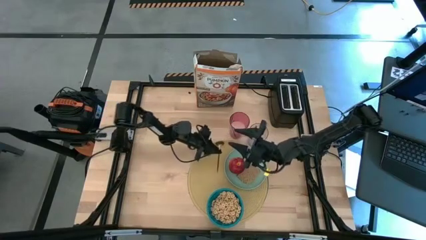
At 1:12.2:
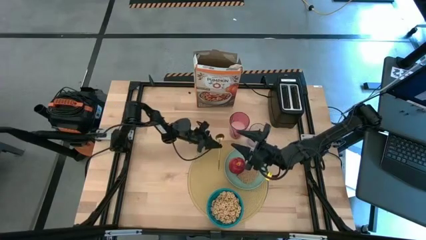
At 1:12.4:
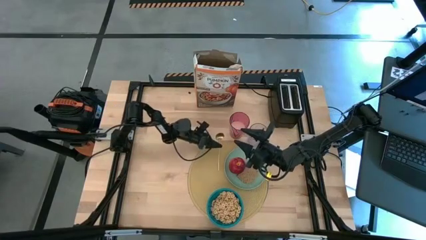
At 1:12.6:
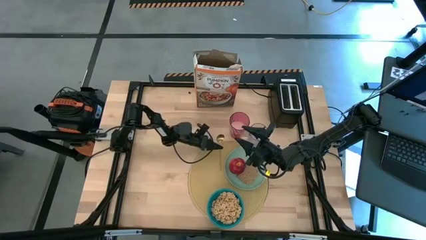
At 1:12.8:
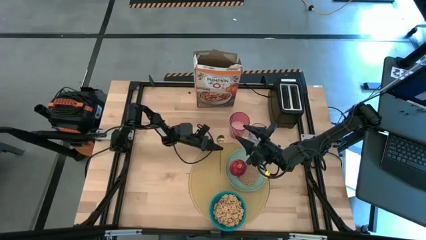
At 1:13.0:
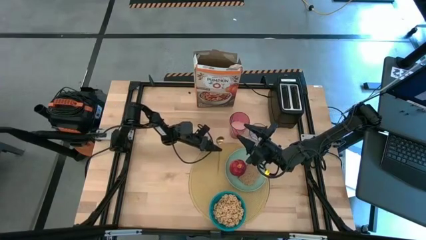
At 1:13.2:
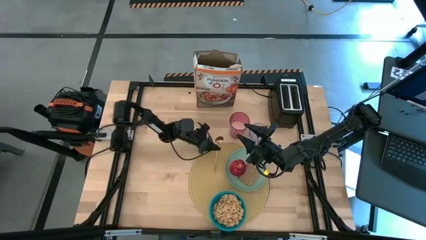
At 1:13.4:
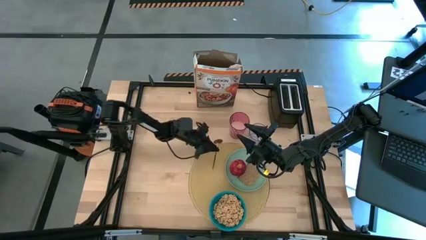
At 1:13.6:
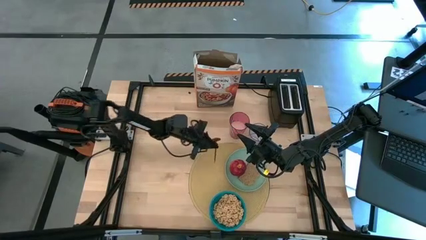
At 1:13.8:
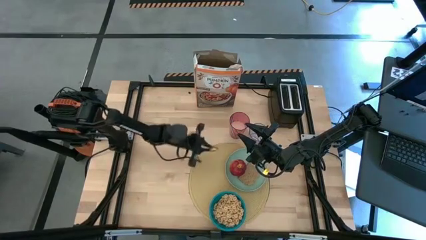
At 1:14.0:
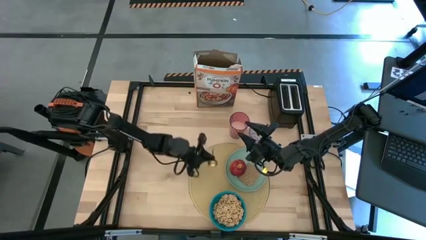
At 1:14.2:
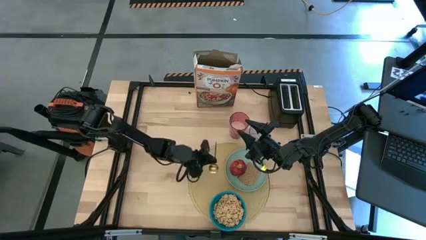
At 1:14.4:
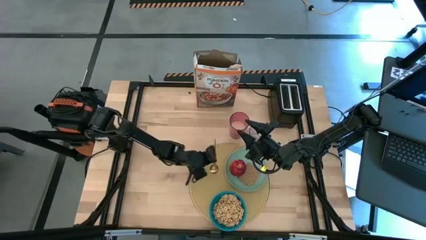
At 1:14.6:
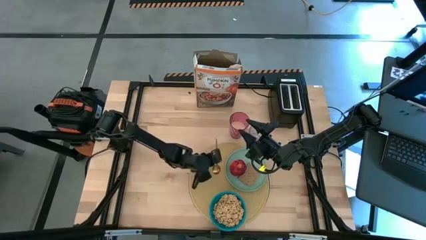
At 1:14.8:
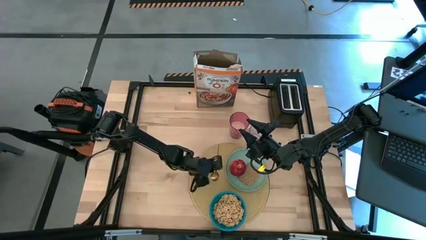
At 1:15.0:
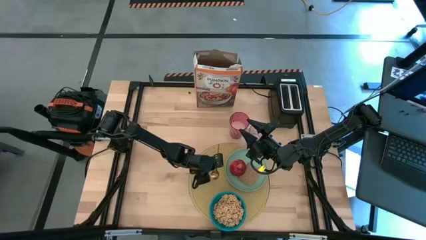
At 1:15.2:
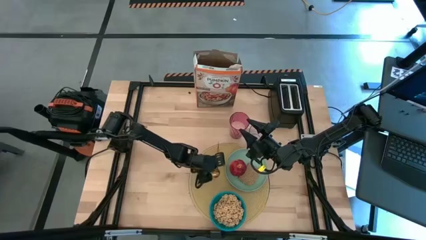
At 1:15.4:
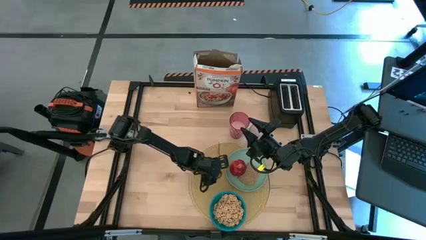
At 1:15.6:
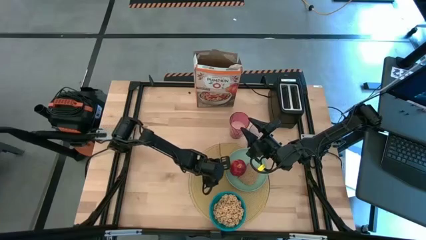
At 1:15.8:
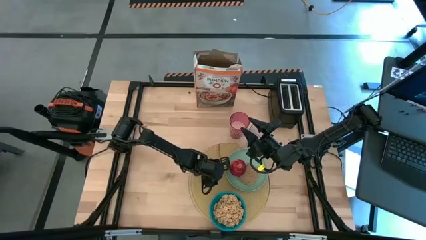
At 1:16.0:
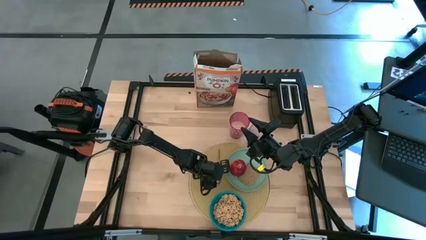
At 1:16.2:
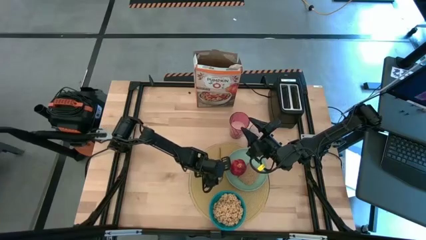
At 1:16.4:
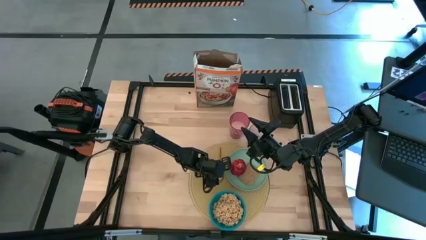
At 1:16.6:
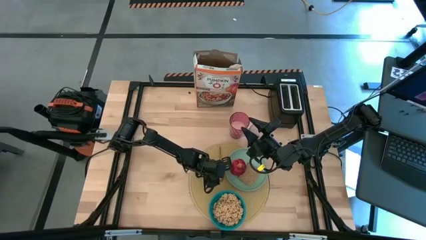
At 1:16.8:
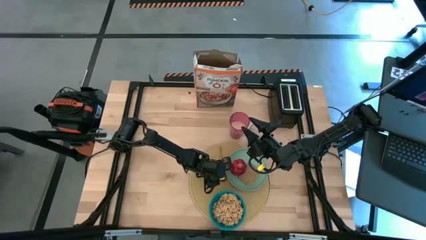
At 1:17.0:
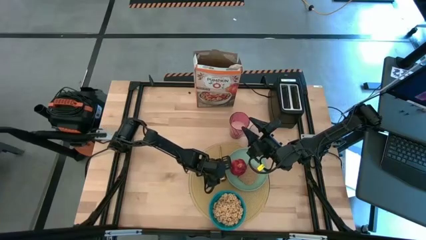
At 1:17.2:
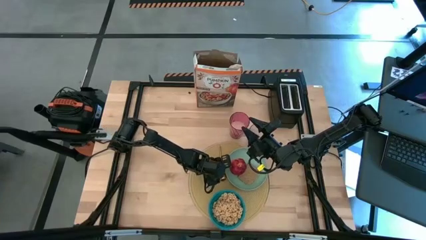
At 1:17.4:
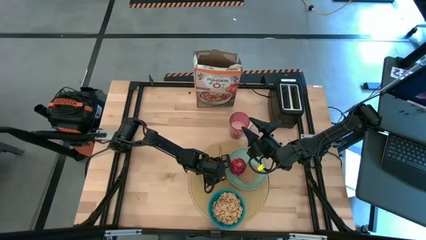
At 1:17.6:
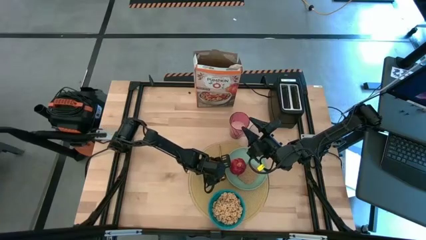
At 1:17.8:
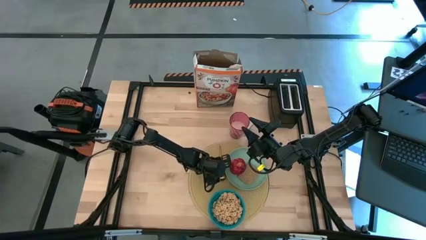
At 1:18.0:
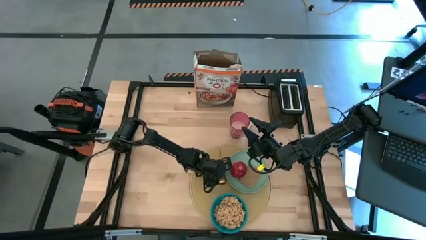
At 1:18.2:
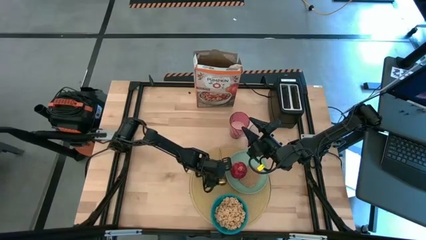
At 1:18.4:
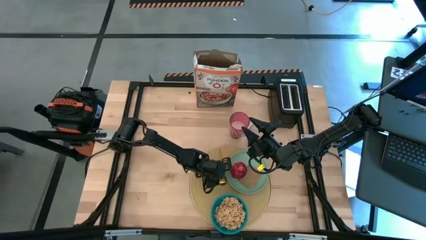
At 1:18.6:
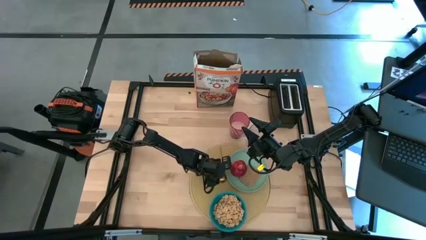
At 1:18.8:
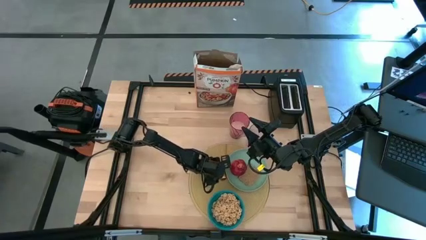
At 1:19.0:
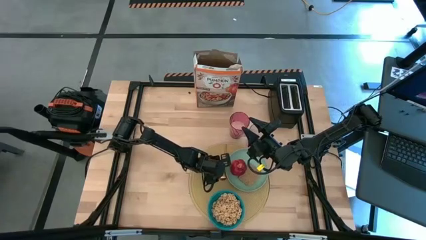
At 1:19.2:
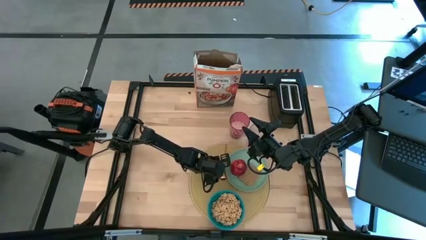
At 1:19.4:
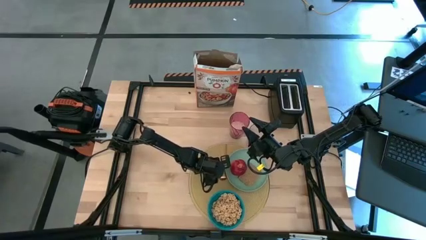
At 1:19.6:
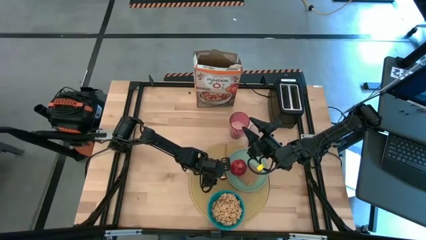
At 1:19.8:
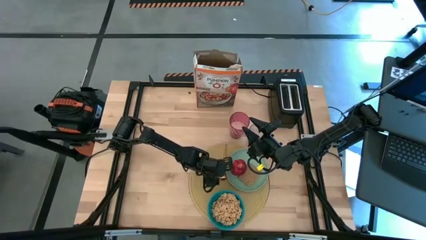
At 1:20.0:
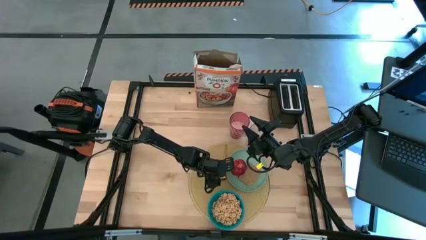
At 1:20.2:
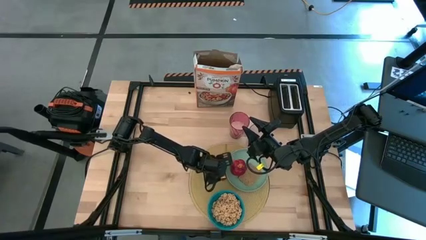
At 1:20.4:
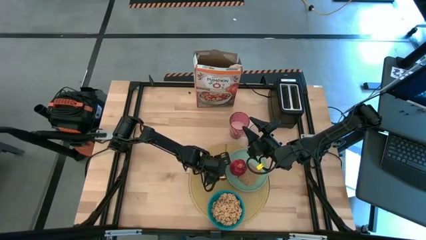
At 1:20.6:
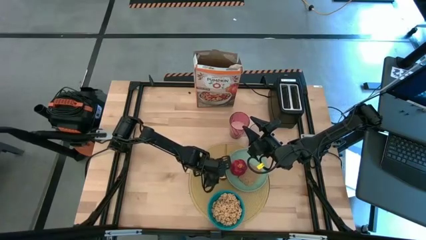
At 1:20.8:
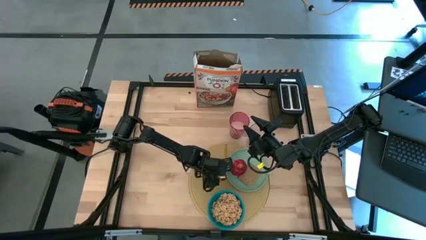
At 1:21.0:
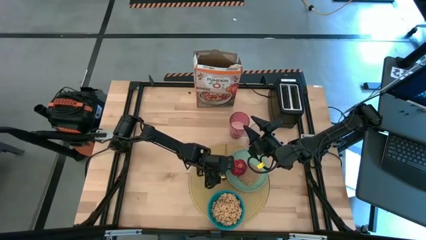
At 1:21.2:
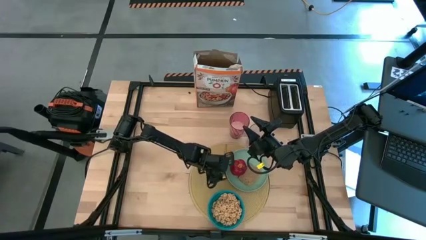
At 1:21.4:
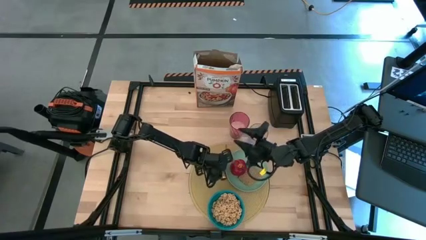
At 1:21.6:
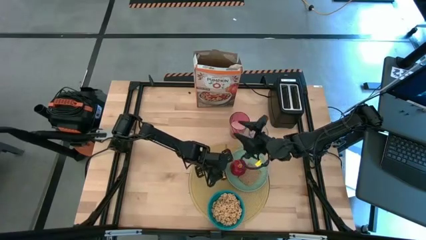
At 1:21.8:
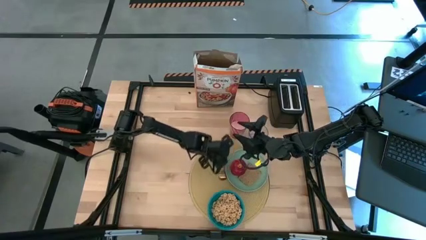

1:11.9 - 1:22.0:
Task: Arrange a breakfast setting
Put the spoon on the brown table mat to the left side of the blue bowl

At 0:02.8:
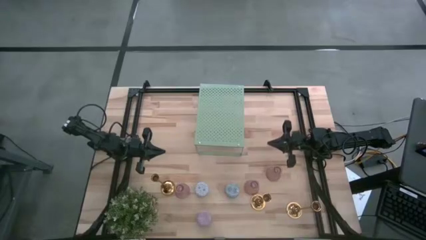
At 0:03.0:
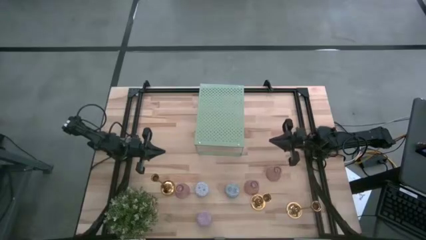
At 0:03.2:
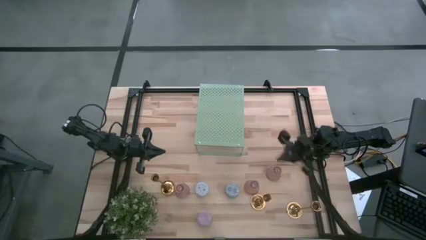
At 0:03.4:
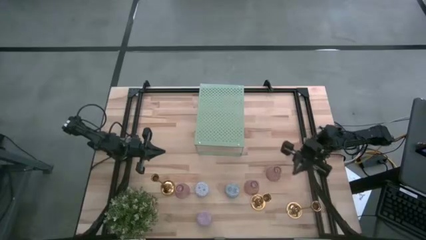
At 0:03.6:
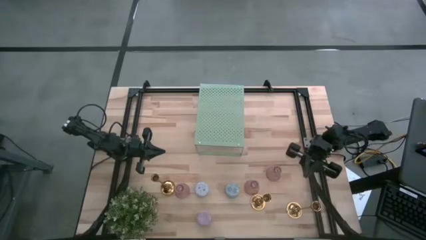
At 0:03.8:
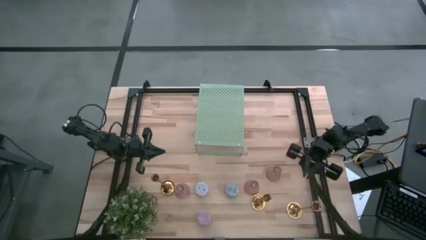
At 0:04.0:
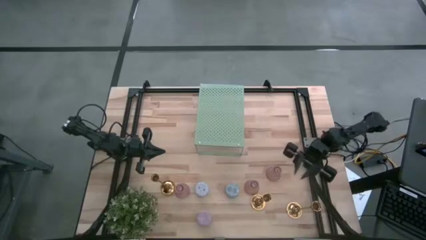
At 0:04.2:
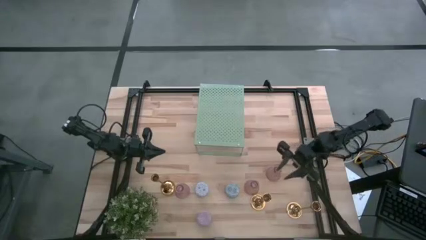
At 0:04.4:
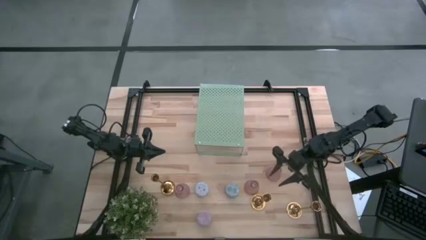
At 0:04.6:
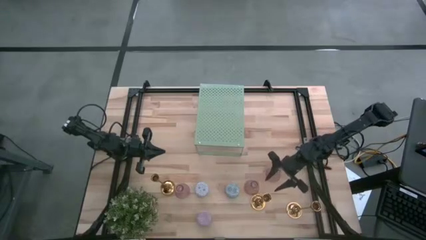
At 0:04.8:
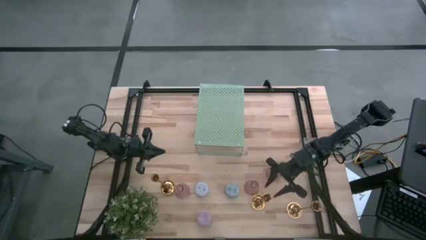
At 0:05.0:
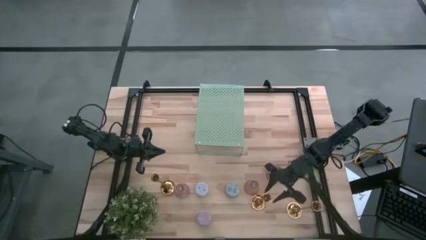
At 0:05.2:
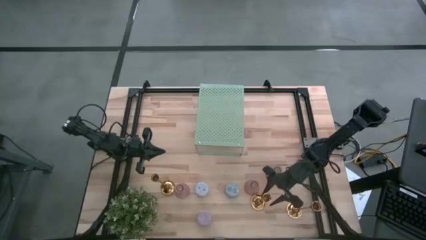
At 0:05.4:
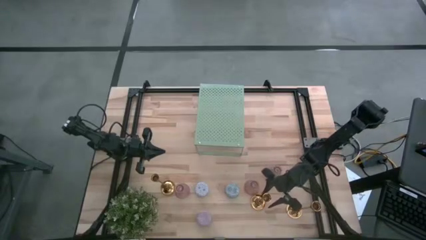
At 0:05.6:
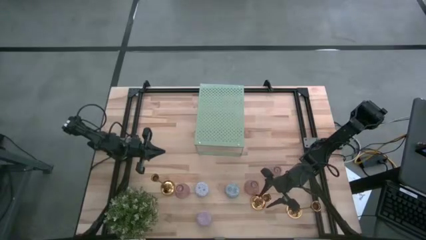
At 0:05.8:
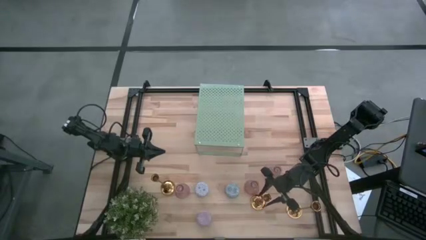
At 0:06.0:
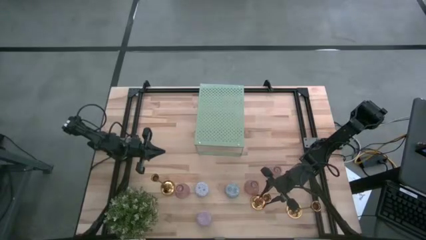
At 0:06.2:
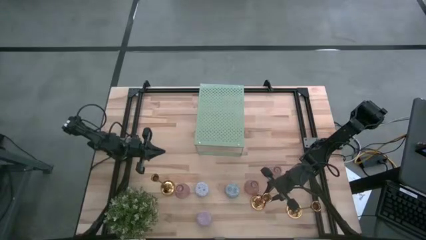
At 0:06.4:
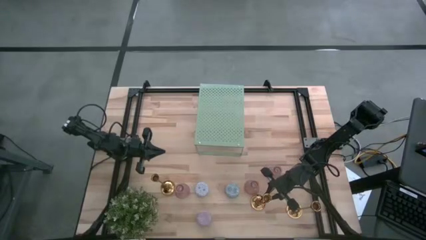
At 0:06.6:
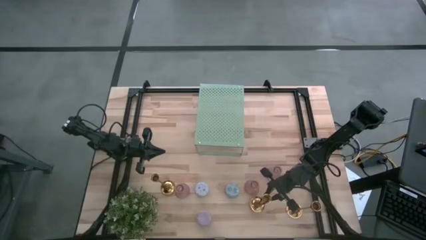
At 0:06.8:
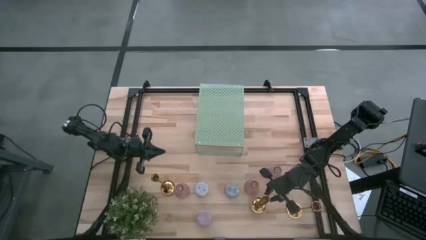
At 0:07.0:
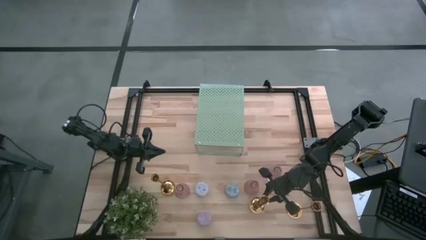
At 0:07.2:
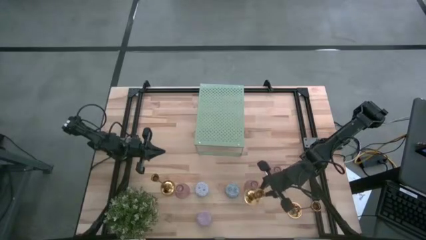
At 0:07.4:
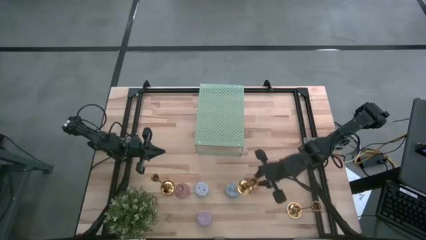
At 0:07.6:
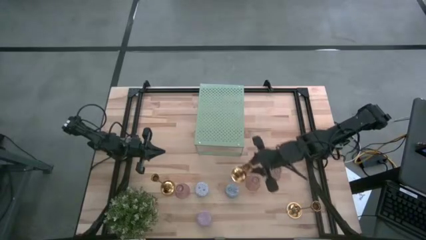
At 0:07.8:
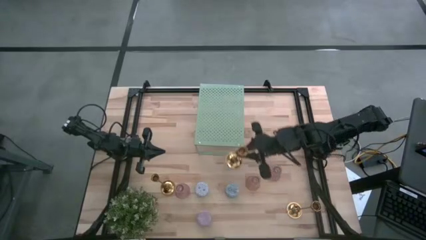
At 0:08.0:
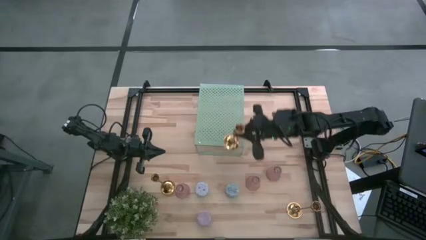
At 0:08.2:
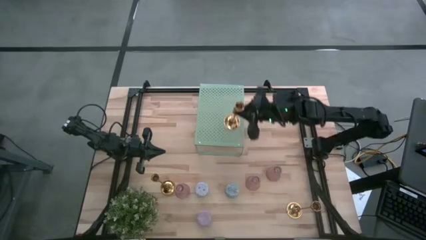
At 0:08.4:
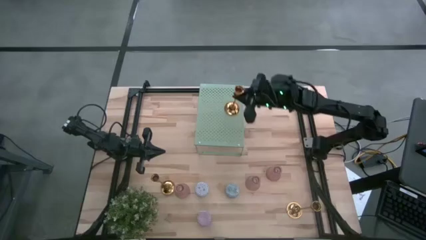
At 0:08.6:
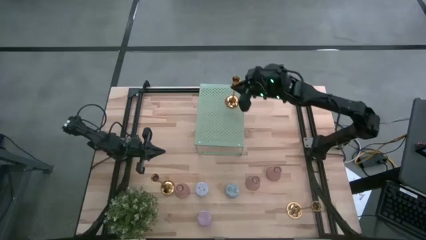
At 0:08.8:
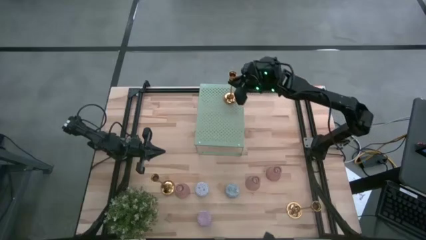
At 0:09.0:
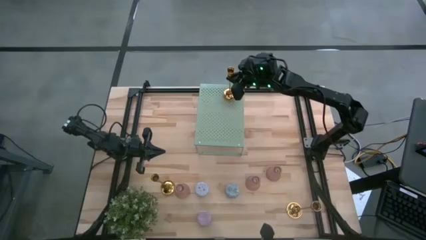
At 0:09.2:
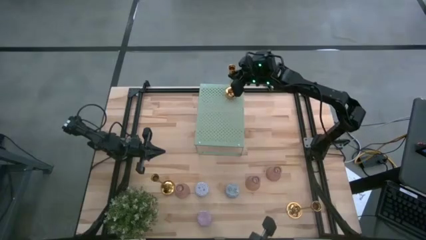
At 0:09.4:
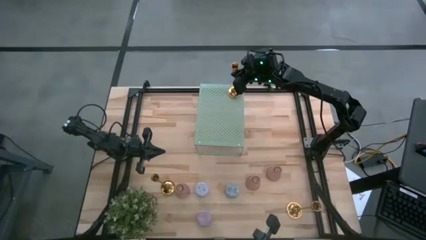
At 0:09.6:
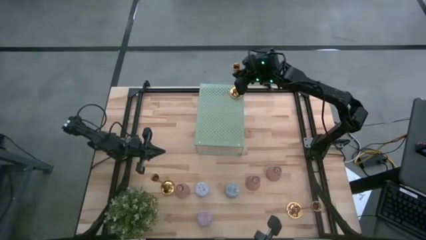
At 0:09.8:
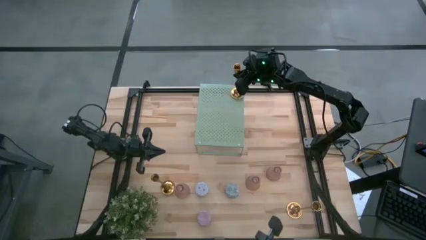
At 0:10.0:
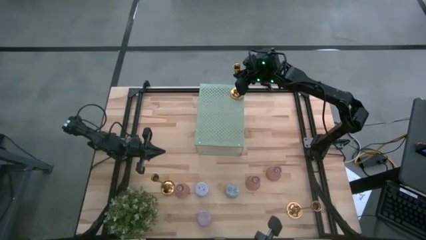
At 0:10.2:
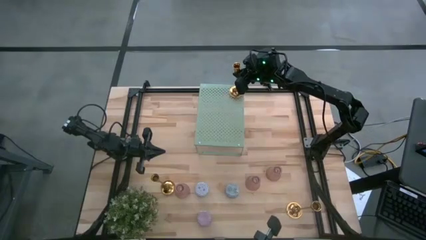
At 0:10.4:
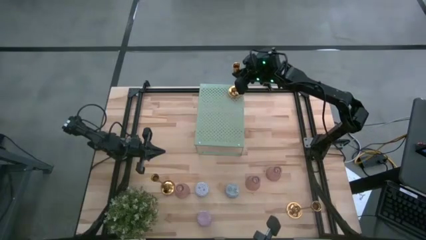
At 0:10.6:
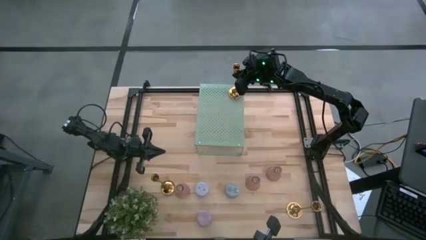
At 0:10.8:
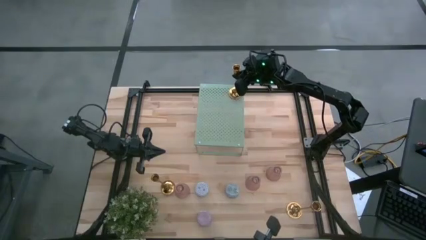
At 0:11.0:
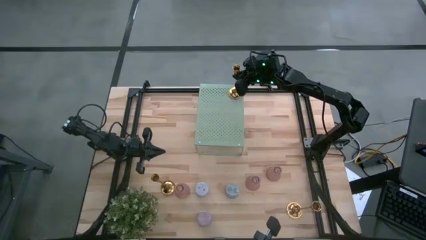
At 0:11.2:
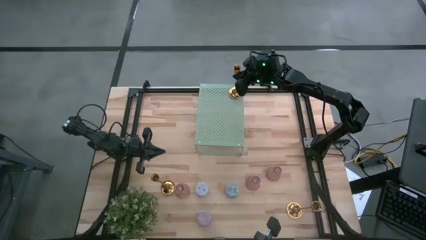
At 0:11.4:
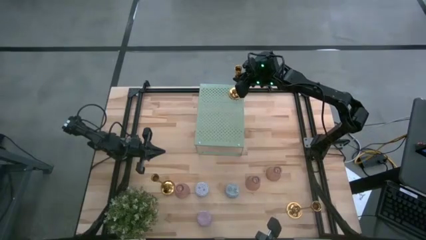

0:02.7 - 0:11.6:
Task: Pick & Place candle stick holders
Put the middle gold candle holder on the shelf
